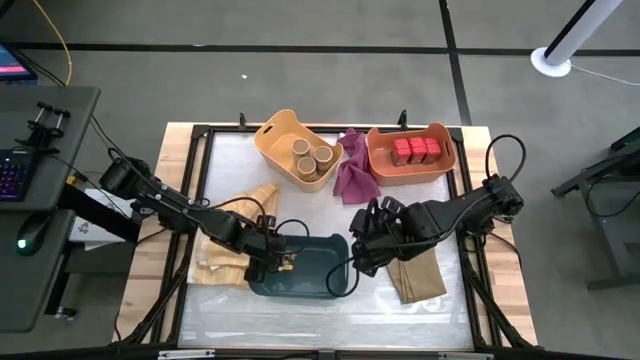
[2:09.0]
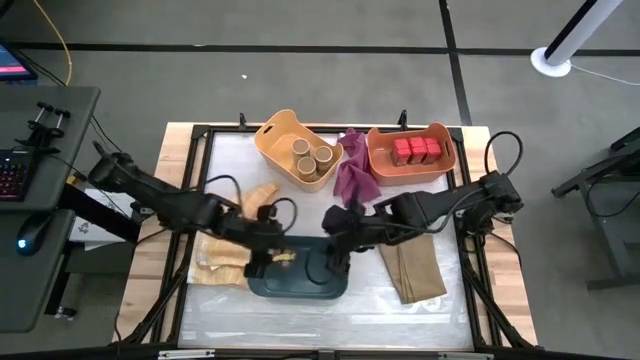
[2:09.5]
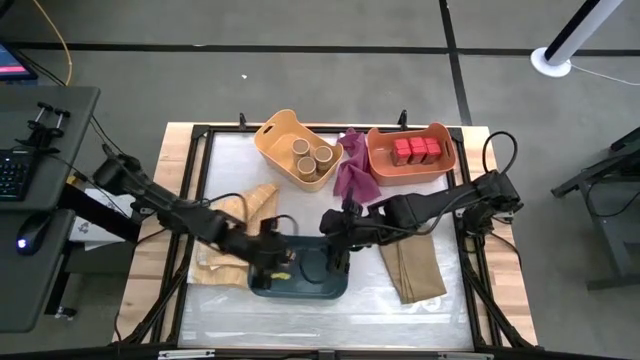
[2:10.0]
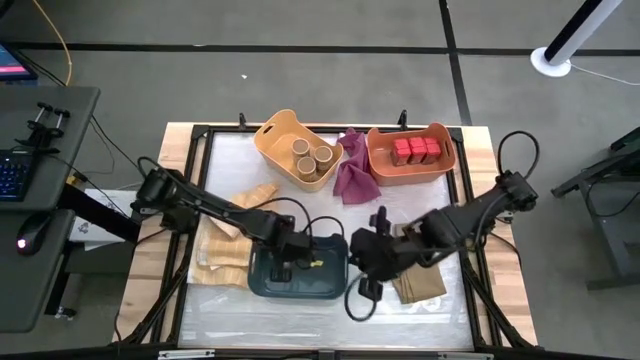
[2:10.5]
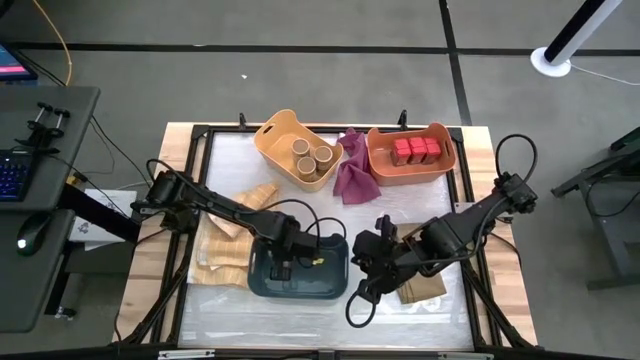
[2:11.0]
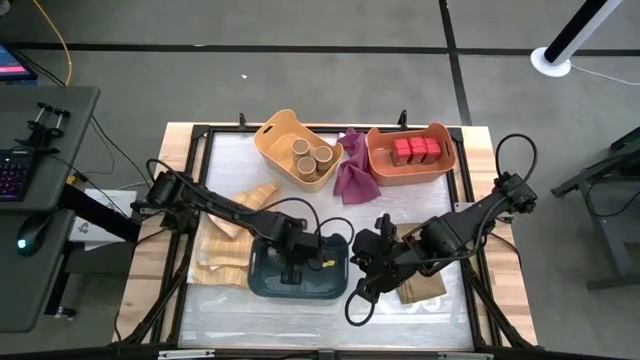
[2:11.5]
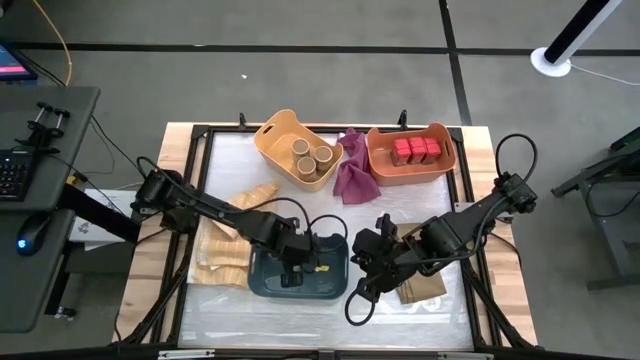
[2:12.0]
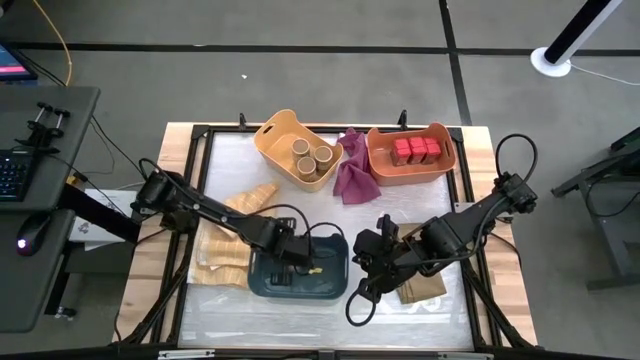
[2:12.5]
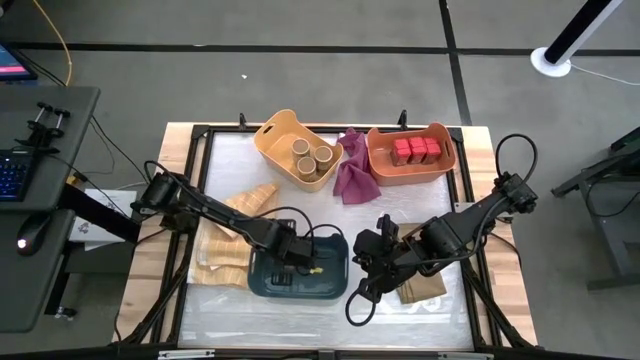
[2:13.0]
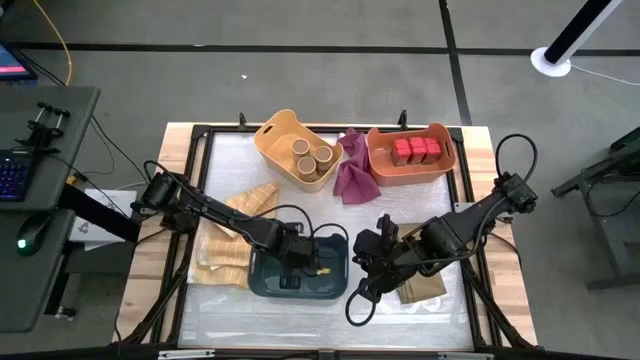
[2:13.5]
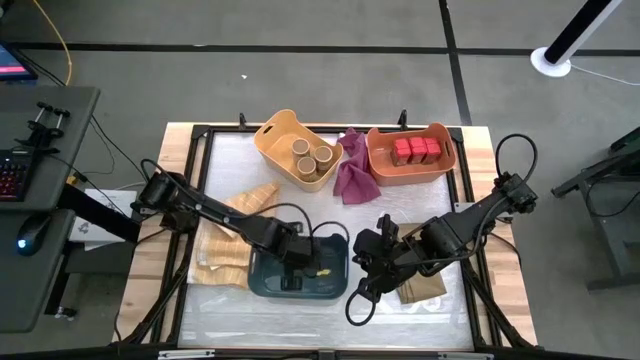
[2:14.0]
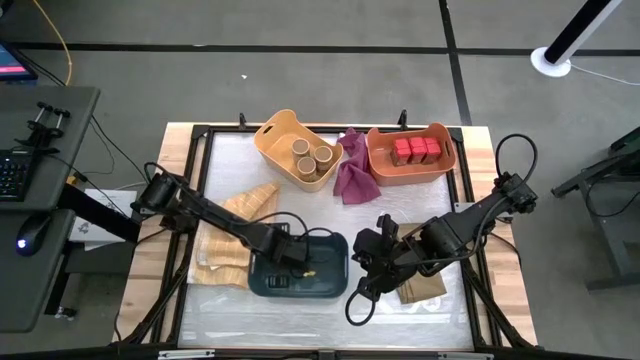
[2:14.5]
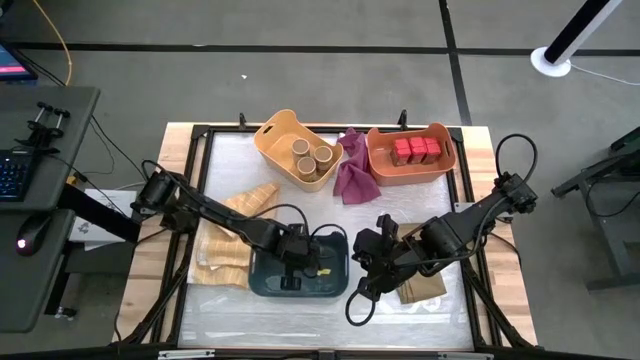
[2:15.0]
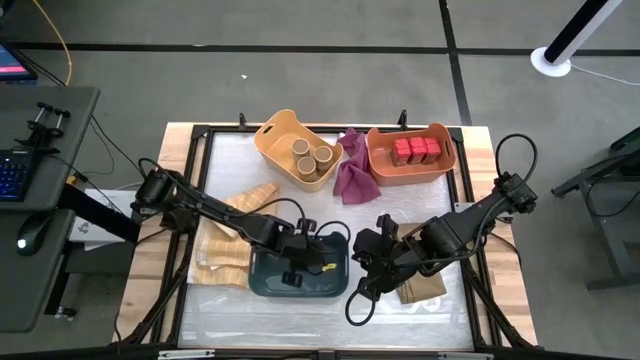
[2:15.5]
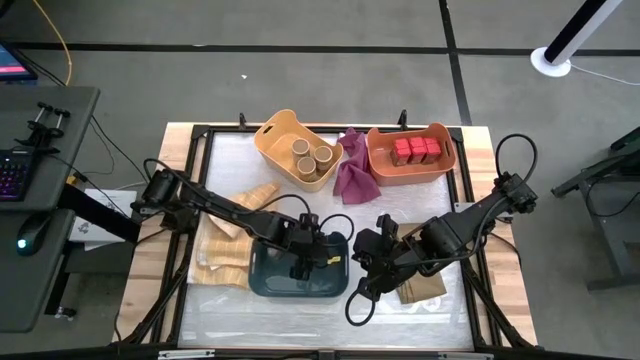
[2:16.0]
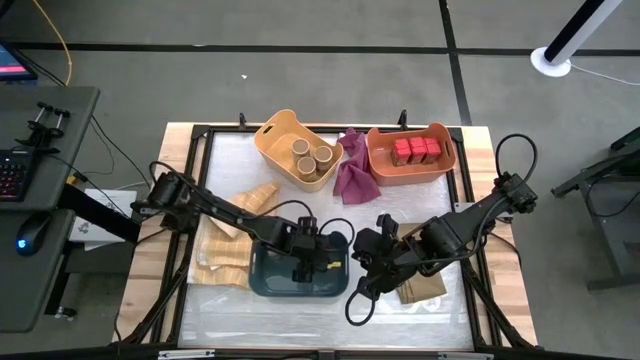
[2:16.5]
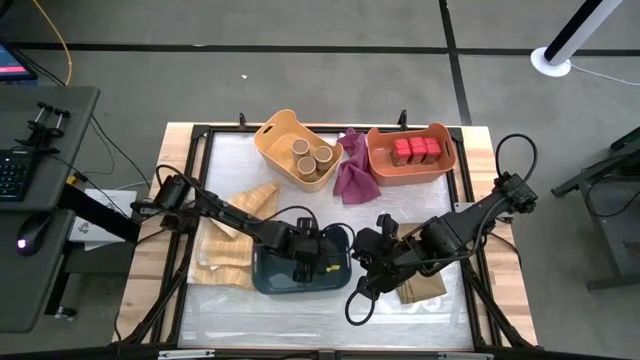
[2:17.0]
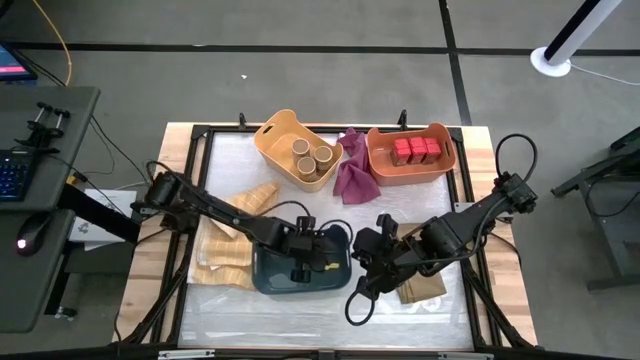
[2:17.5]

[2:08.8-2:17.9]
Task: Sort spices by type
Adjust the transparent seasoning bottle in the blue bin

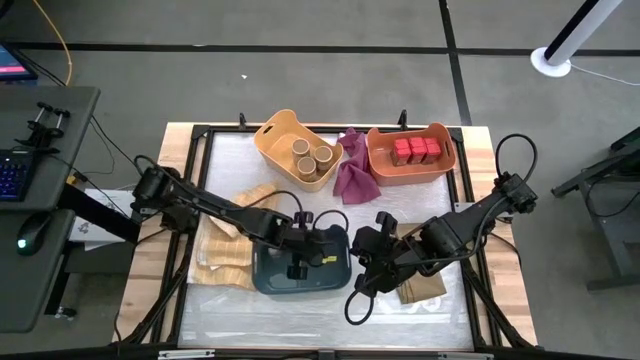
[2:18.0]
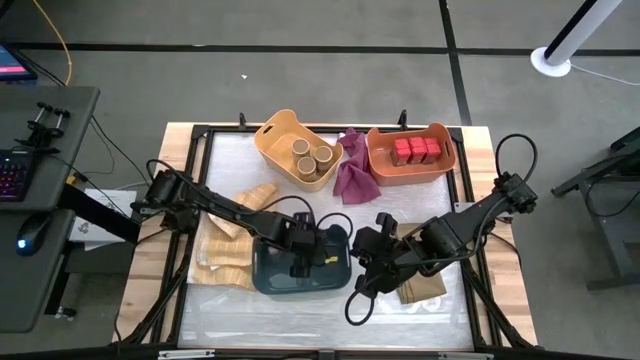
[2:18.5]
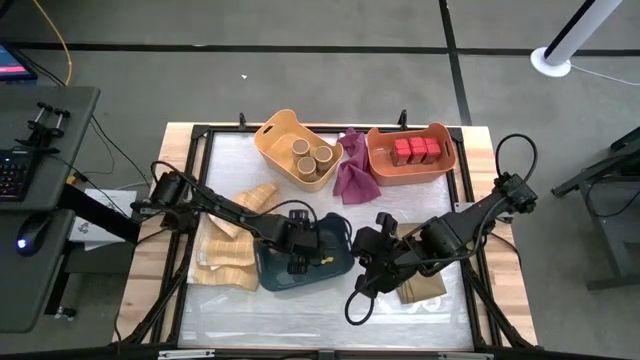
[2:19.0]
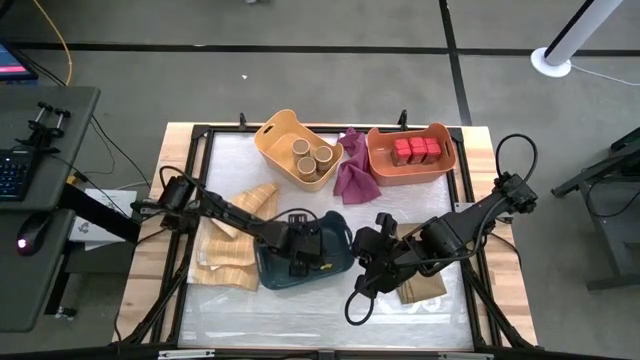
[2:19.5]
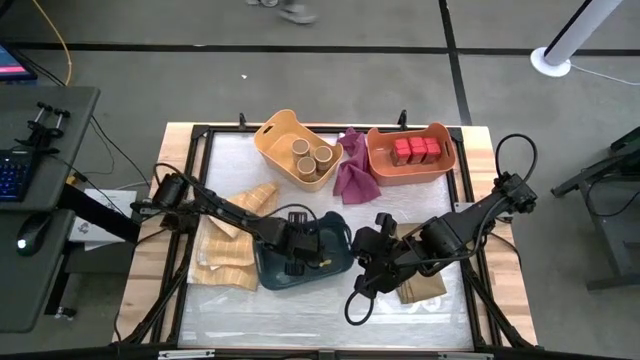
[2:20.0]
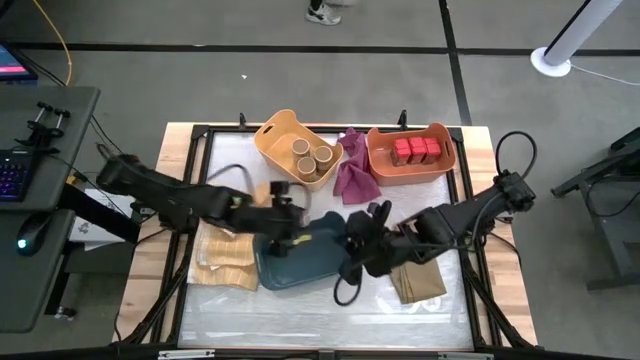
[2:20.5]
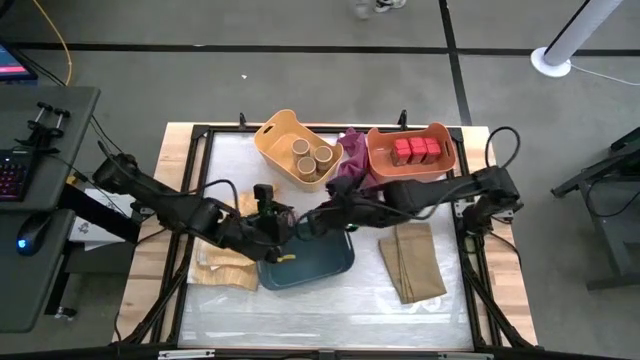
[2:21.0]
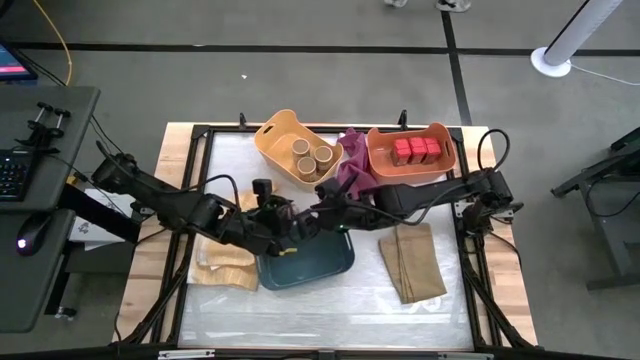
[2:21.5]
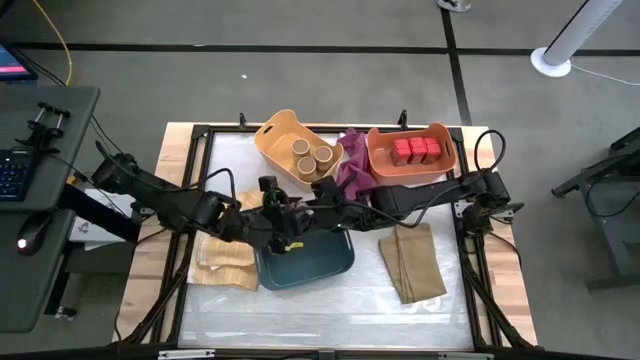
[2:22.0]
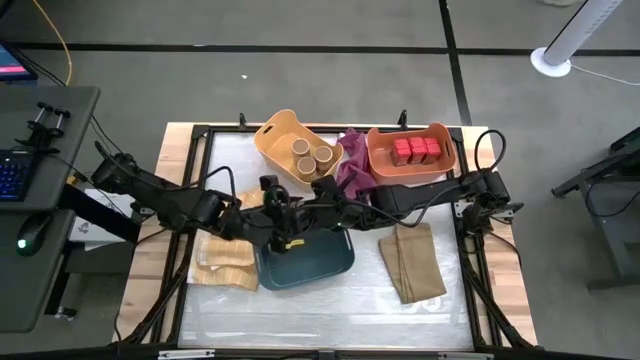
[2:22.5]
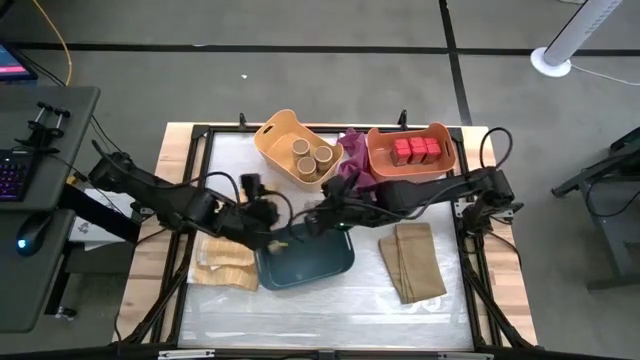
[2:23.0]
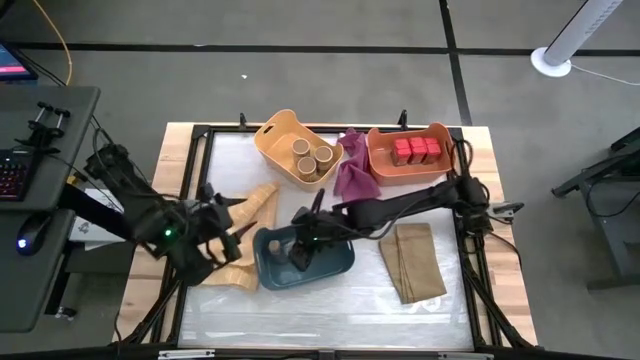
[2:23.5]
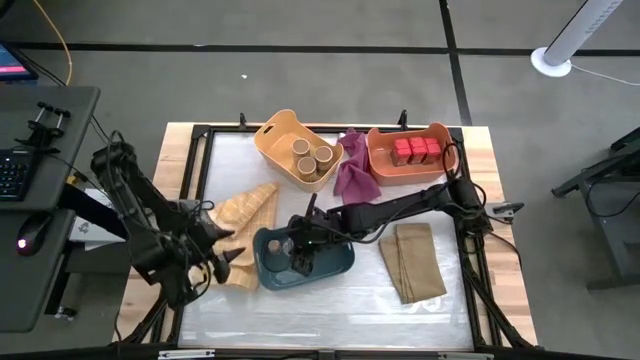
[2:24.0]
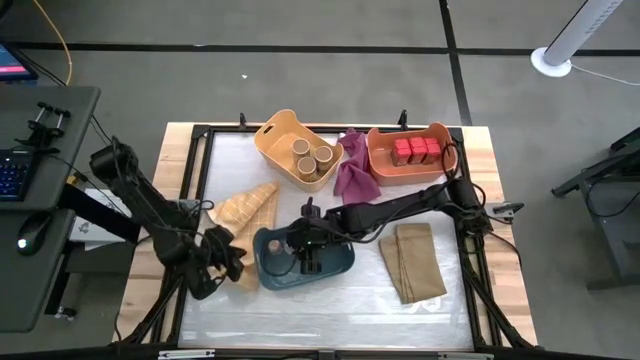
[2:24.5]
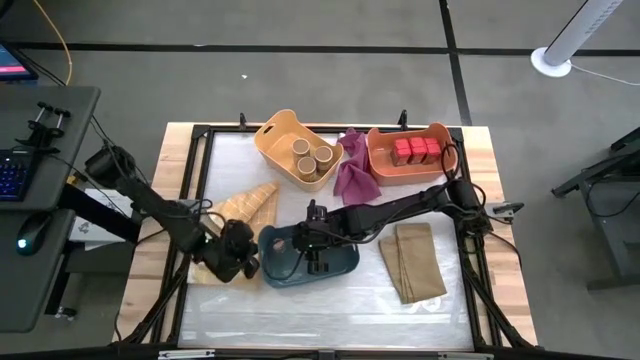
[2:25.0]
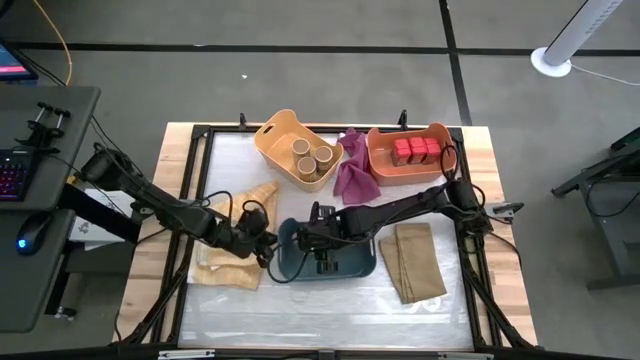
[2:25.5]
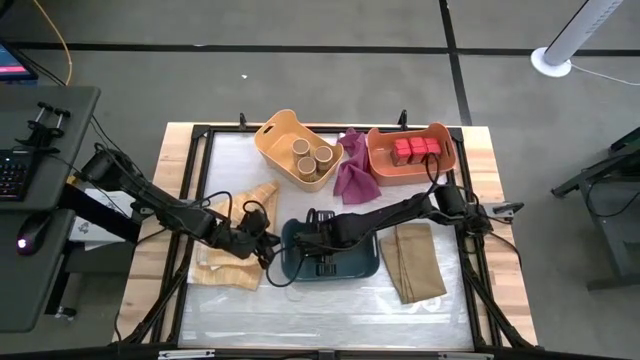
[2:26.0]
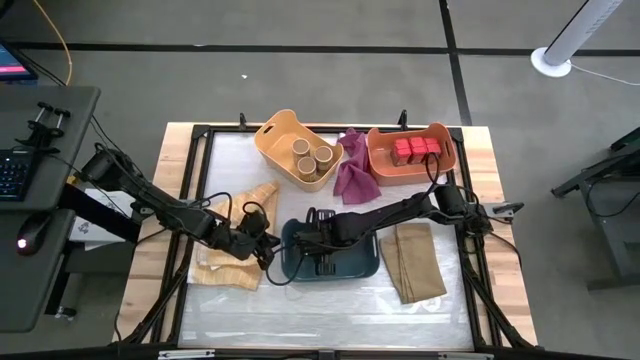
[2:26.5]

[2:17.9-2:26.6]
Adjust the transparent seasoning bottle in the blue bin

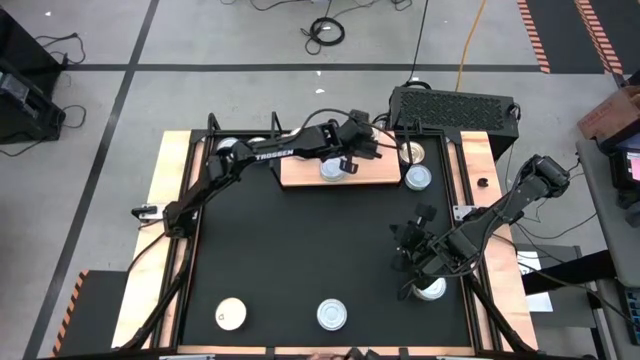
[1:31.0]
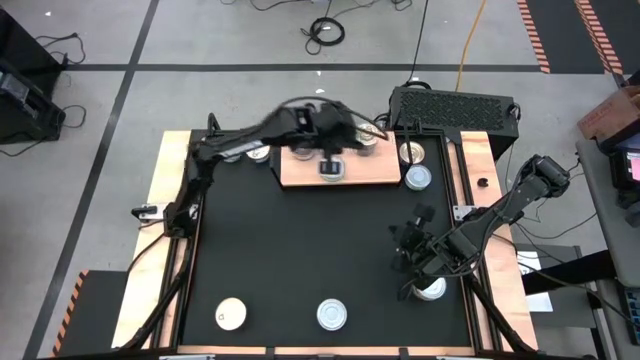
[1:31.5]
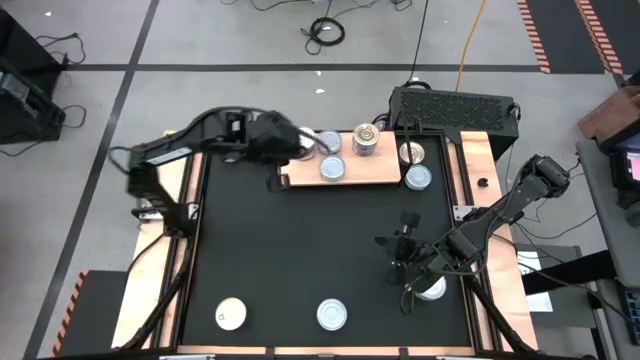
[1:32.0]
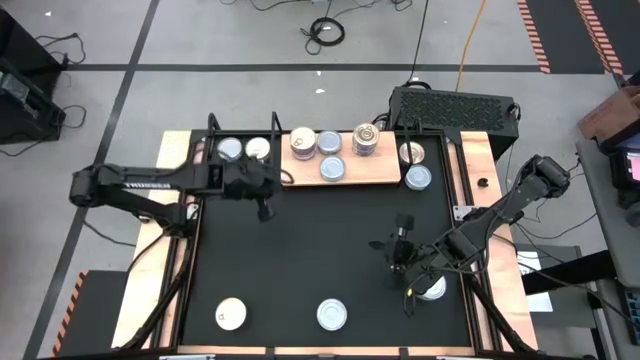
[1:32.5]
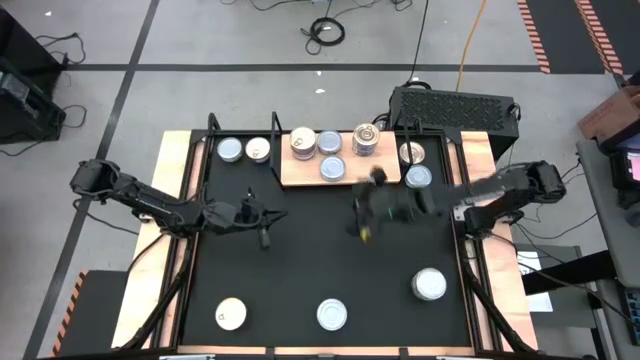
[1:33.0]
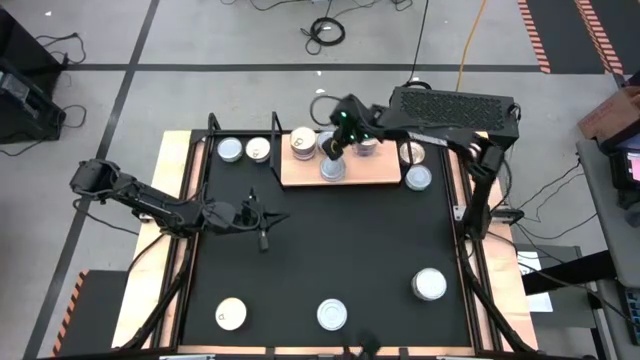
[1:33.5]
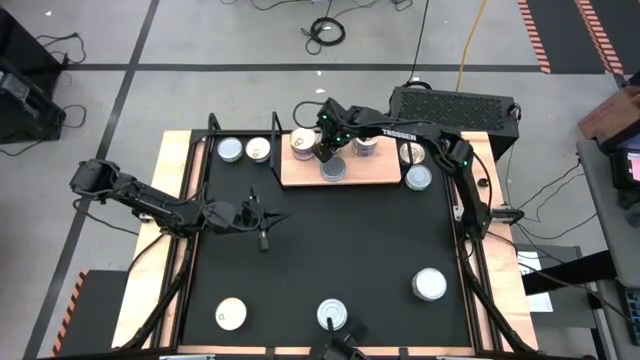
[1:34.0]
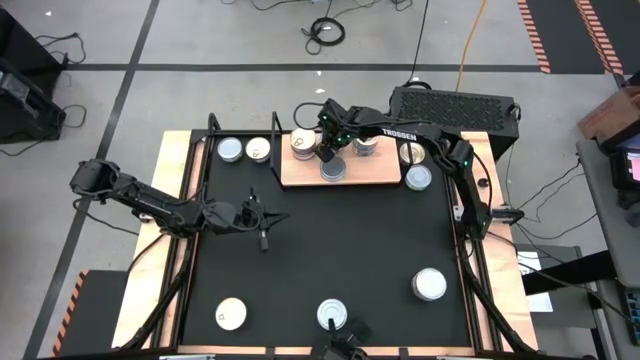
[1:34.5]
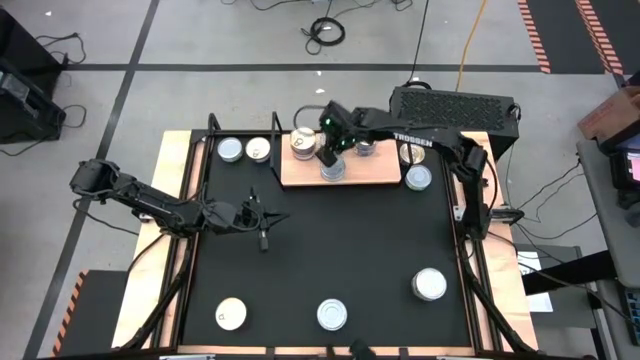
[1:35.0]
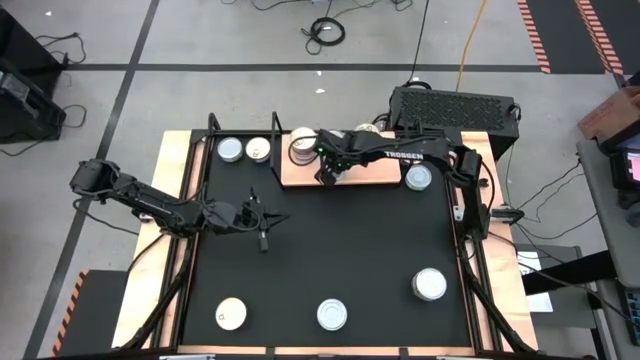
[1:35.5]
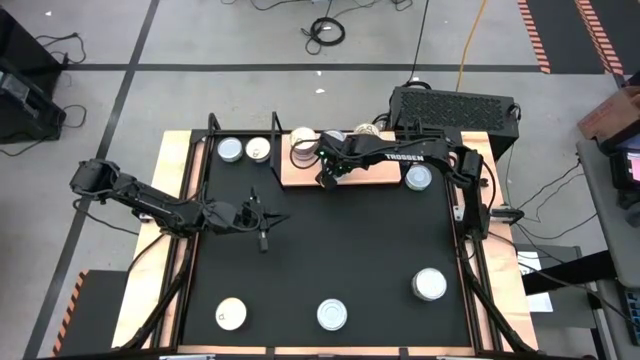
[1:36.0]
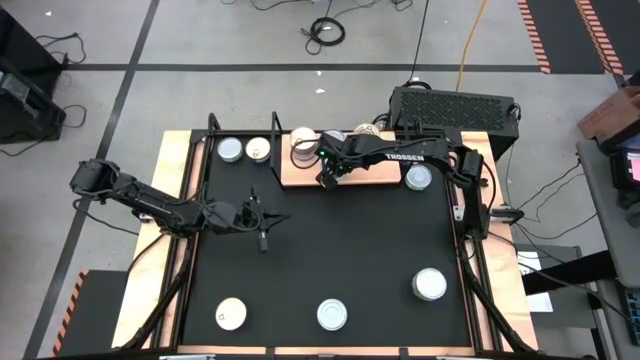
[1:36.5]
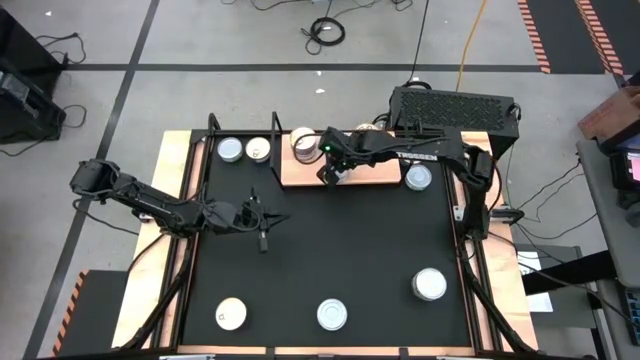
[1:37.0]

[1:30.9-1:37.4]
Task: Stack canned seafood by type on shelf
Adjust the tuna cans on the shelf
